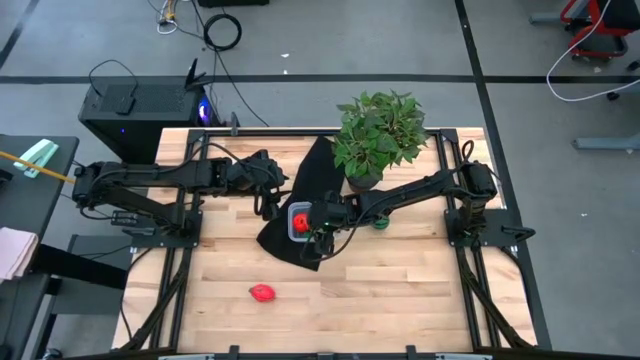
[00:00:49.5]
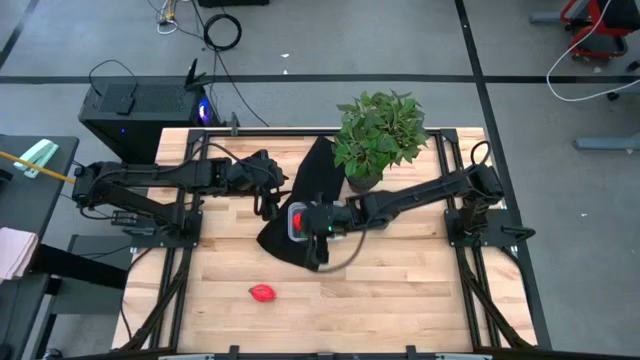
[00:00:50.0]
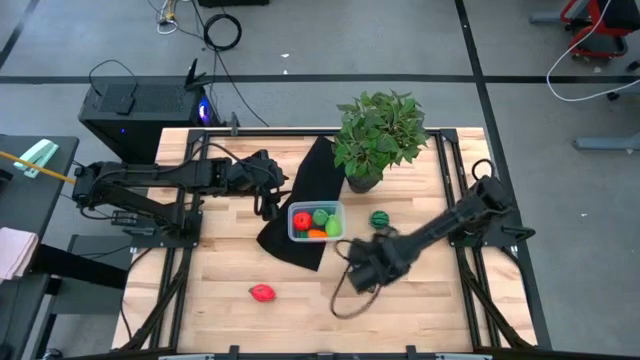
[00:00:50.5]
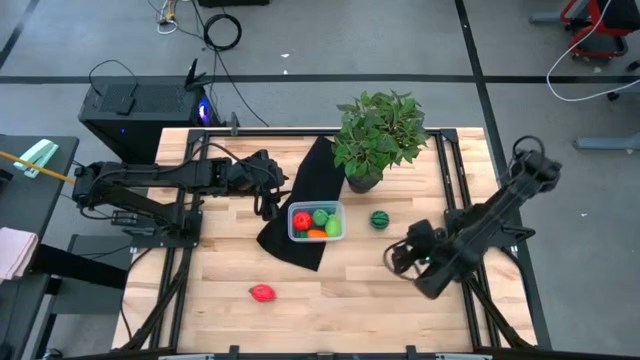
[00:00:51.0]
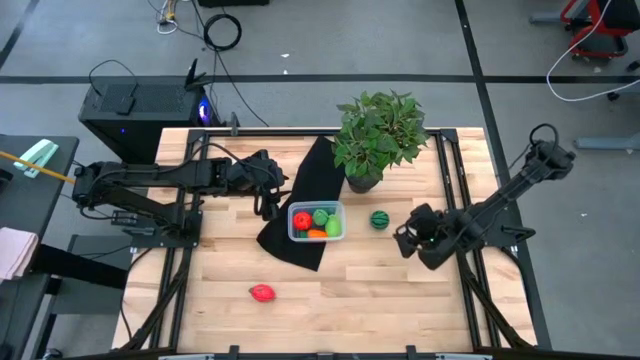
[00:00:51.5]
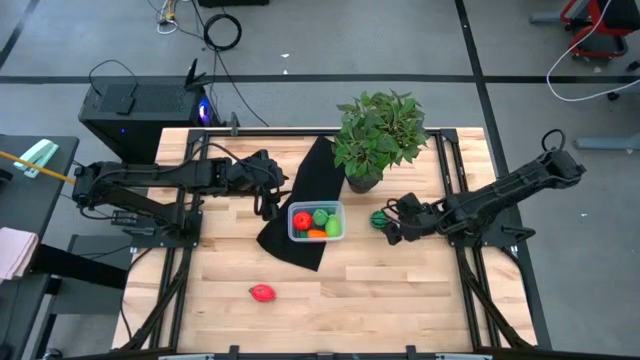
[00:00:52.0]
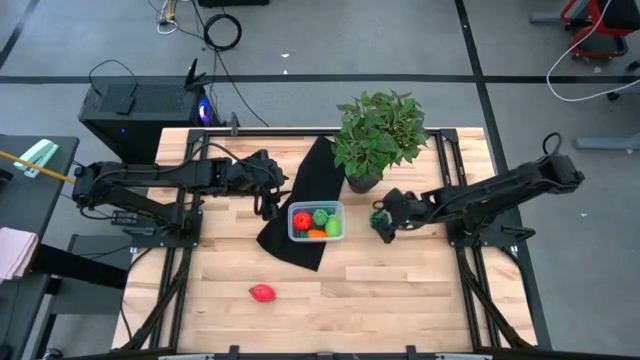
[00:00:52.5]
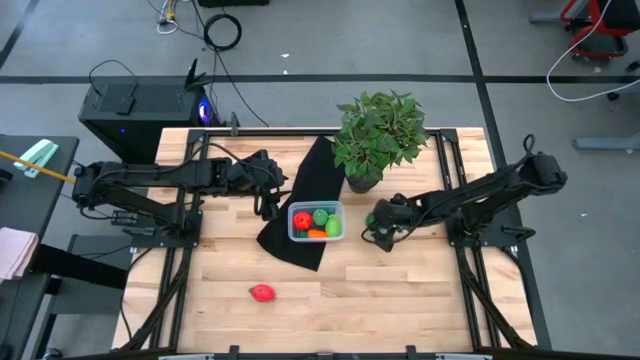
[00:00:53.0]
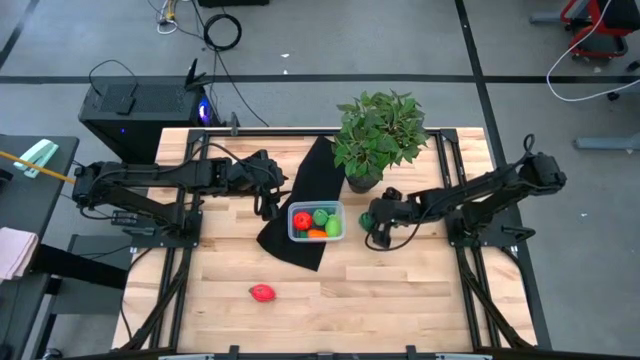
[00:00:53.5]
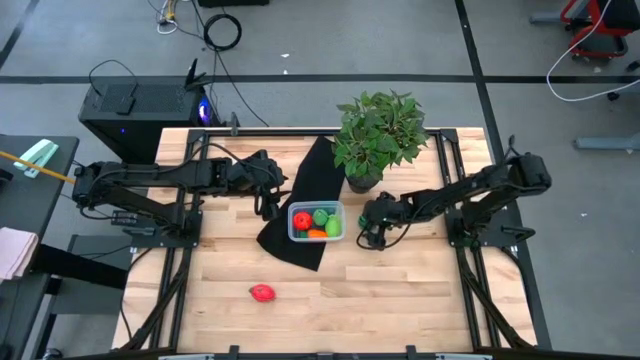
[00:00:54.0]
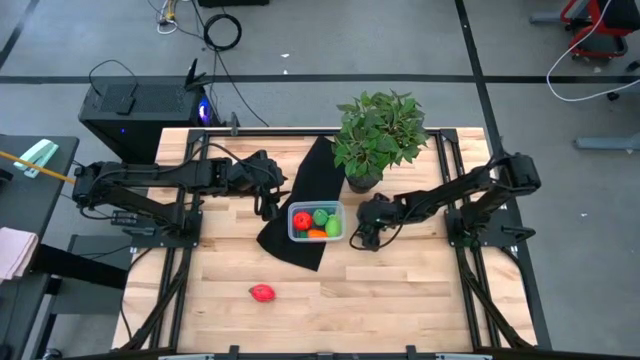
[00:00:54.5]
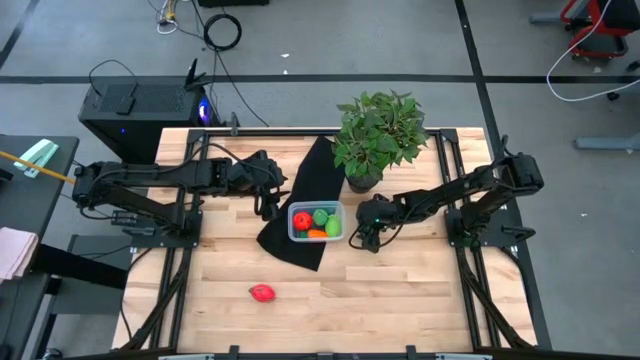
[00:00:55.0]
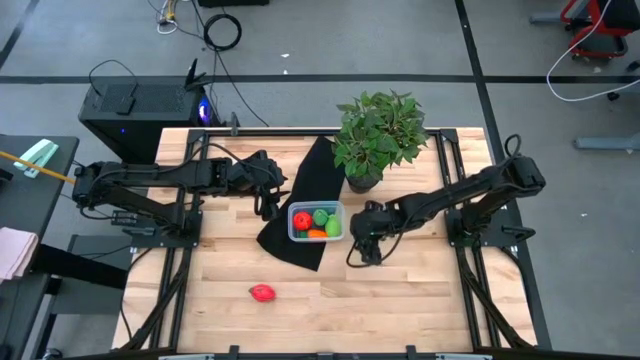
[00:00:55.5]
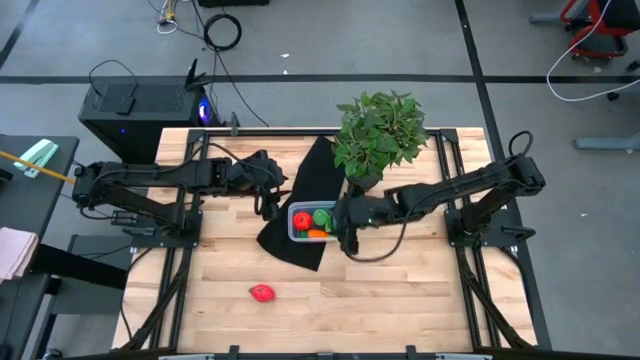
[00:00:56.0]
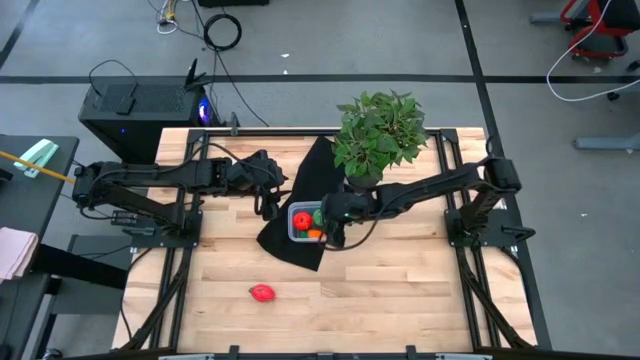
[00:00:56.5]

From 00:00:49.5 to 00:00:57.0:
Task: Pick and placing Produce into tupperware
Put the green watermelon into the bin

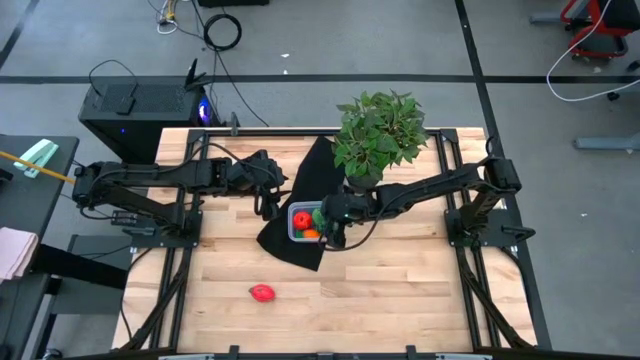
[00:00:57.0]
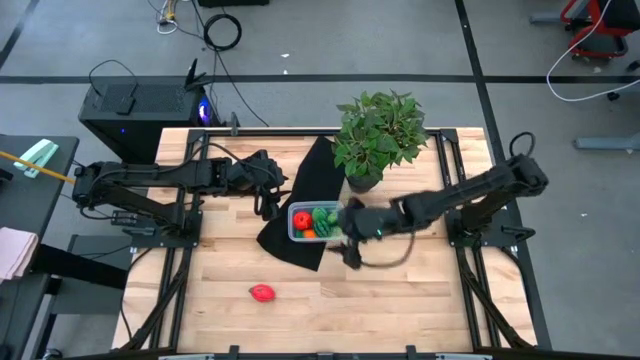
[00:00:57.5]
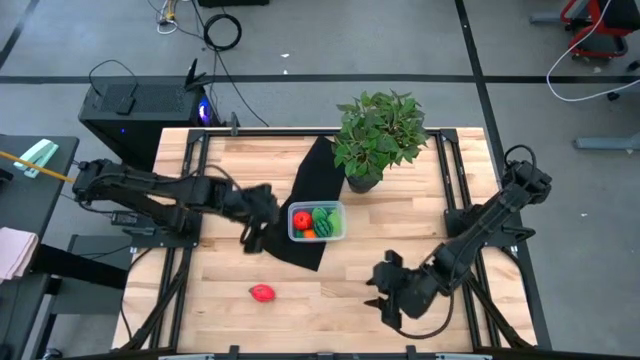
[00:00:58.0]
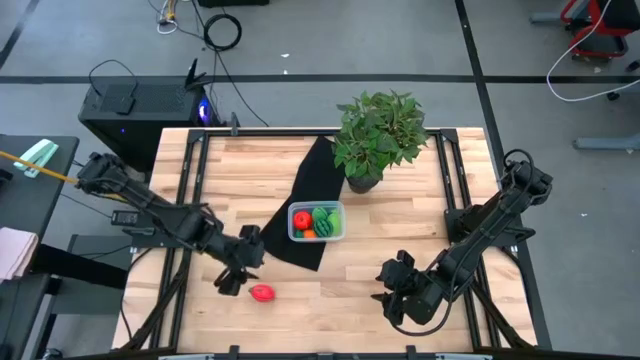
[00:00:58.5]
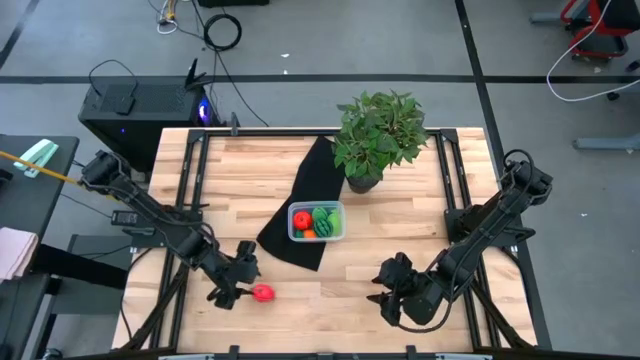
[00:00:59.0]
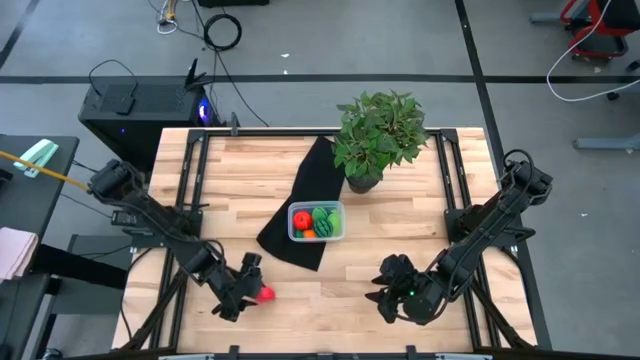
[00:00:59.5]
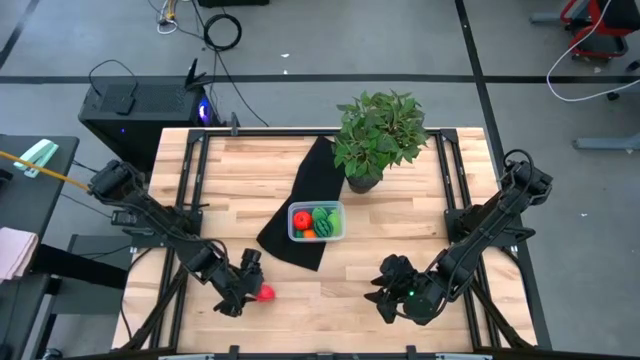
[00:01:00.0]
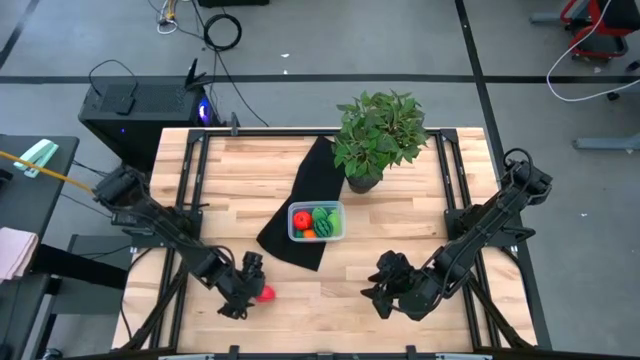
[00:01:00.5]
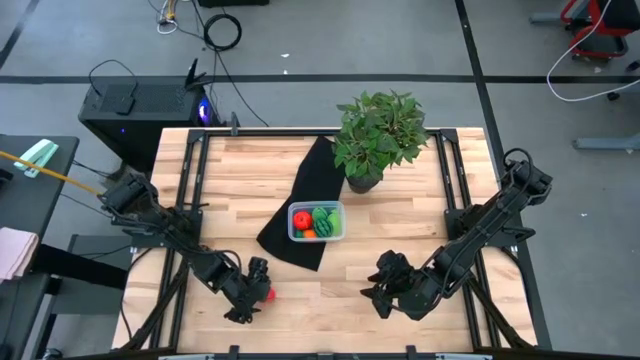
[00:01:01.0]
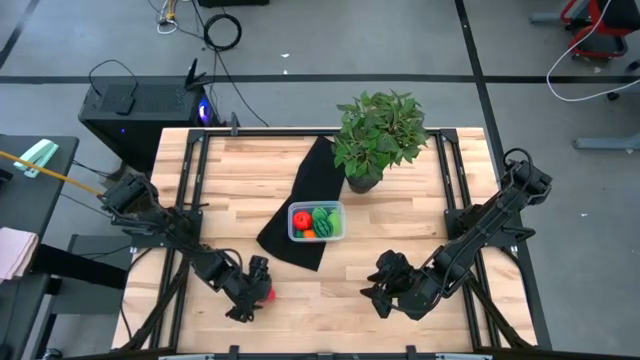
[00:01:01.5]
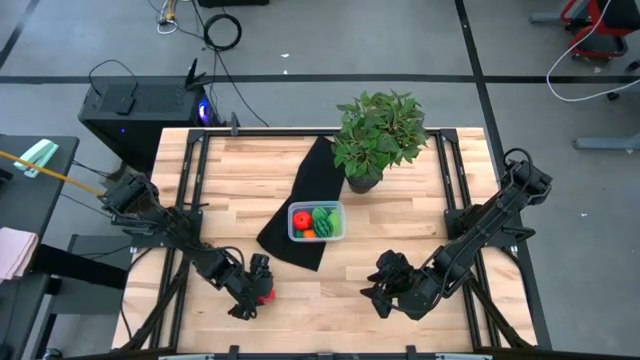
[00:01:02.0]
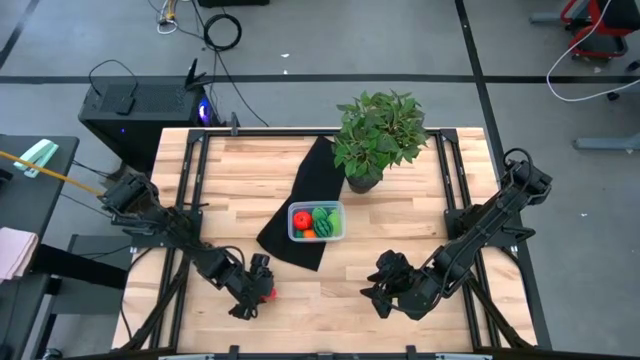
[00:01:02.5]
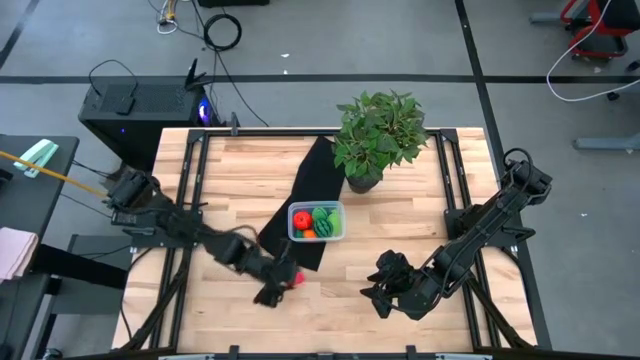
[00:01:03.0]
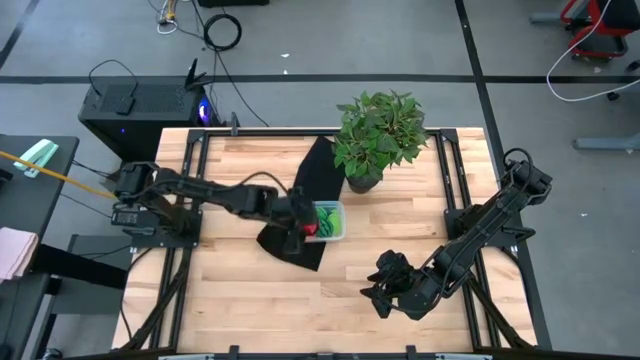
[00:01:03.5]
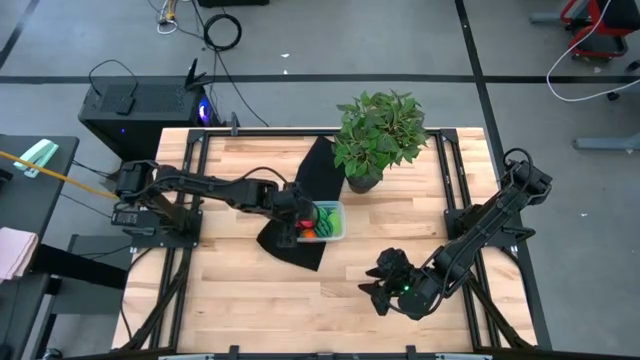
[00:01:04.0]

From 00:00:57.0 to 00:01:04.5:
Put the red dragon fruit into the bin

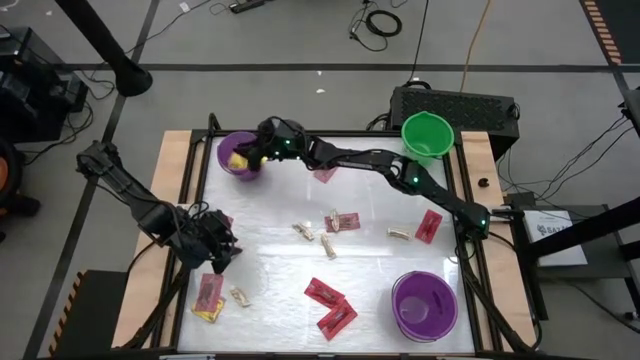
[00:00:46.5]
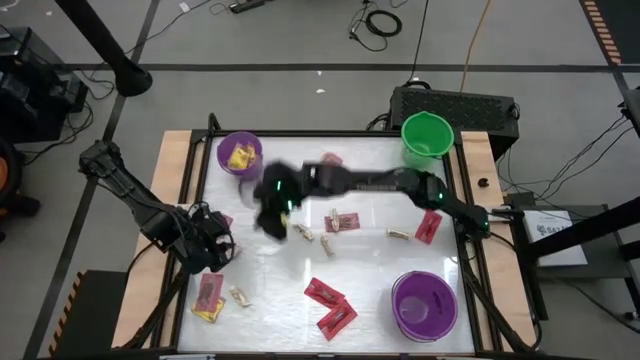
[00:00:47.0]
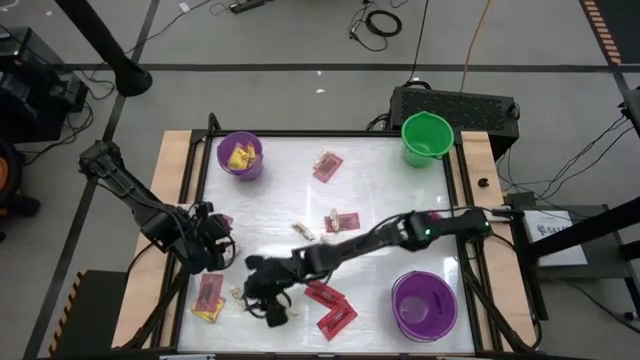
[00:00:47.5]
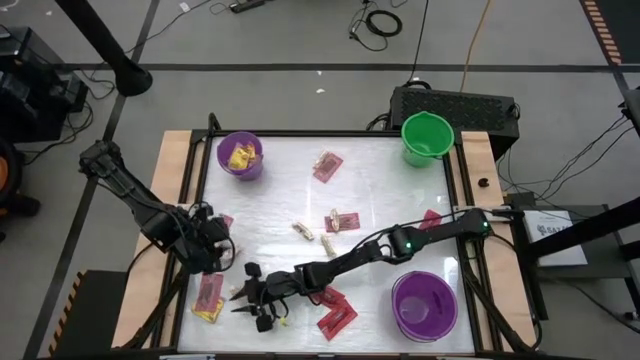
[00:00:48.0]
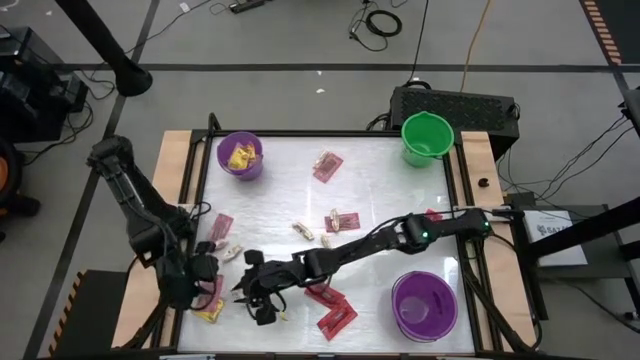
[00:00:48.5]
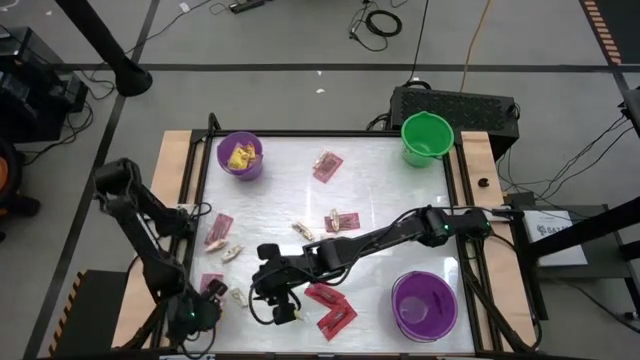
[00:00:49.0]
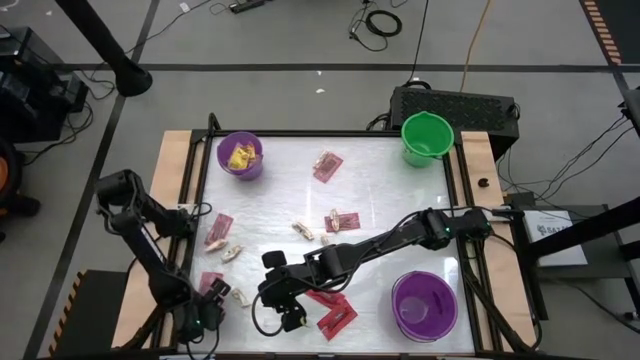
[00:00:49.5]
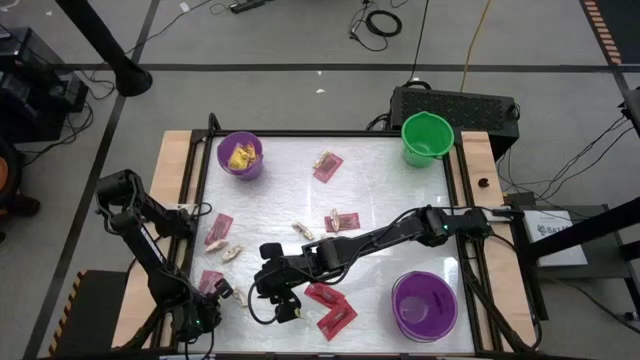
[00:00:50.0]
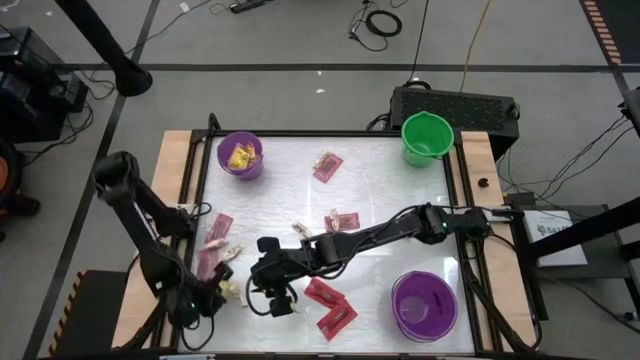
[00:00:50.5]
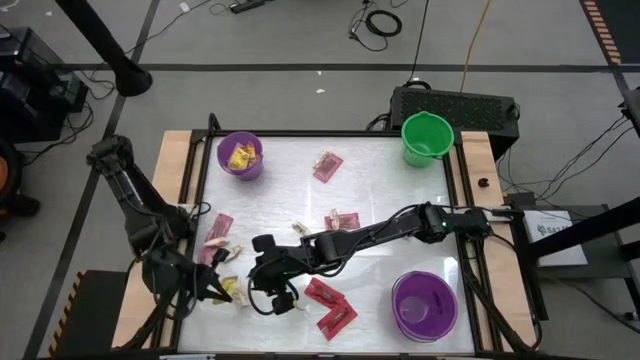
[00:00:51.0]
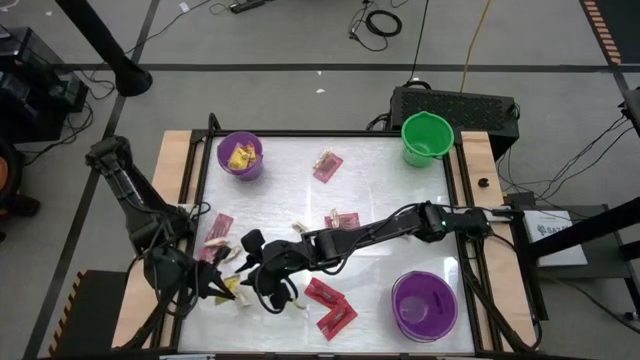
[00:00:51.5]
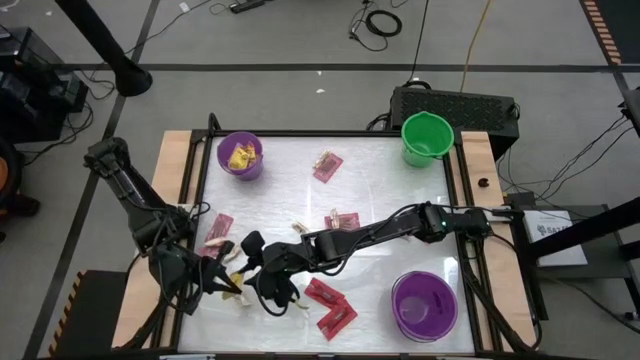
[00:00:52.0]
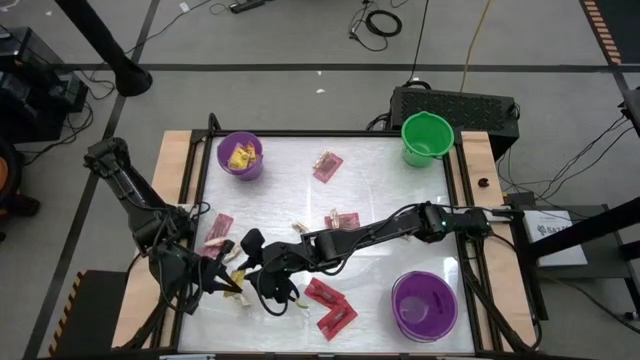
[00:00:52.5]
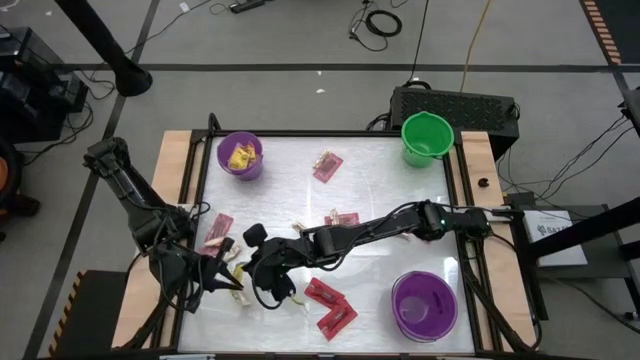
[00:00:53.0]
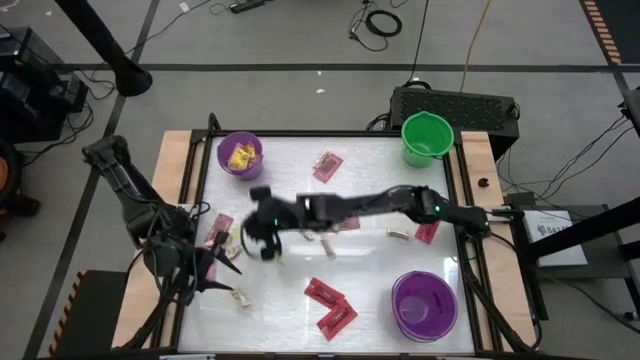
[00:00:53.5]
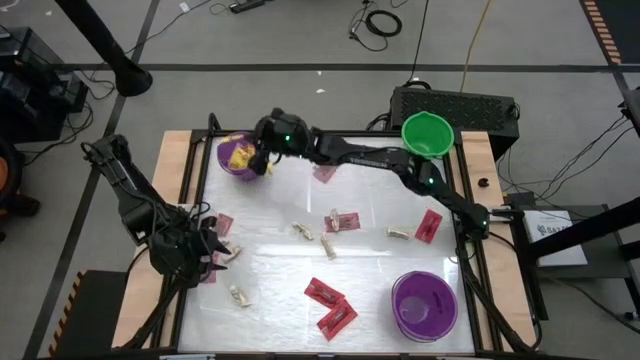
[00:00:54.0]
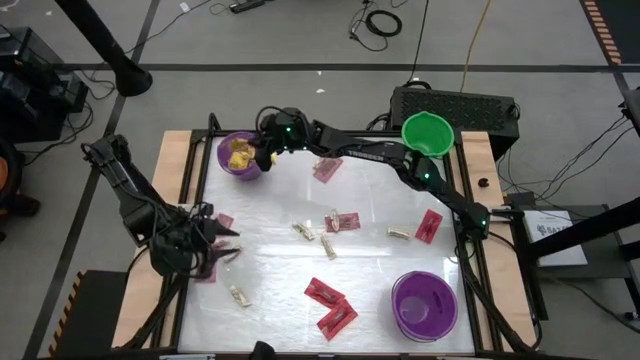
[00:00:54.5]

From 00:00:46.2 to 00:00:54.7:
Task: Sort candy by brand, put in halloween buckets
Put the yellow candy into the top violet bucket
